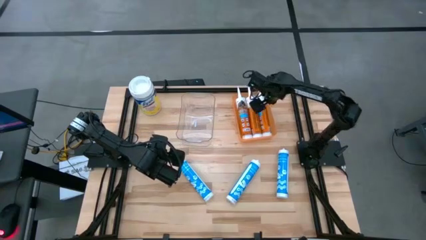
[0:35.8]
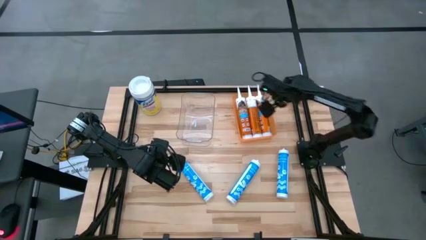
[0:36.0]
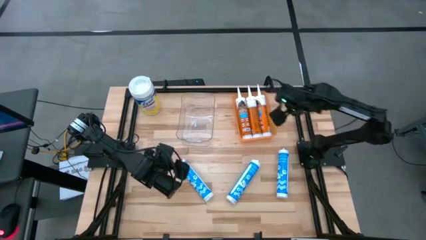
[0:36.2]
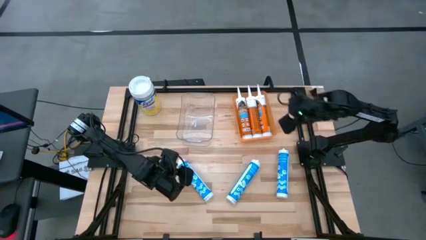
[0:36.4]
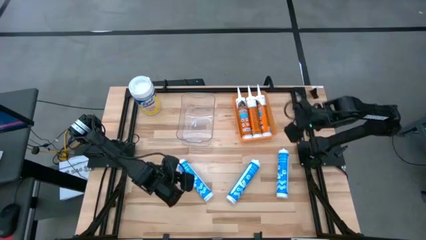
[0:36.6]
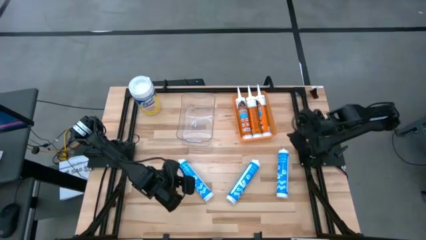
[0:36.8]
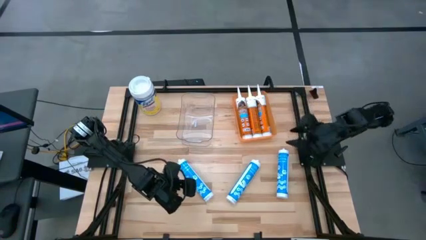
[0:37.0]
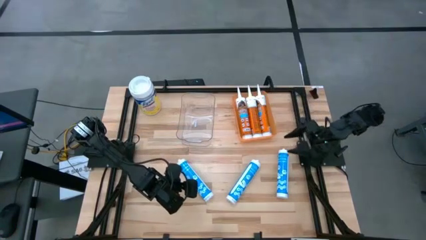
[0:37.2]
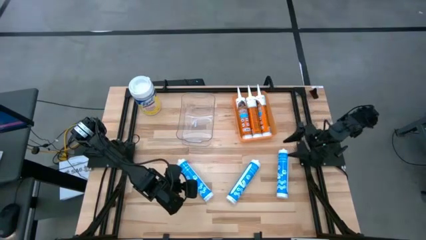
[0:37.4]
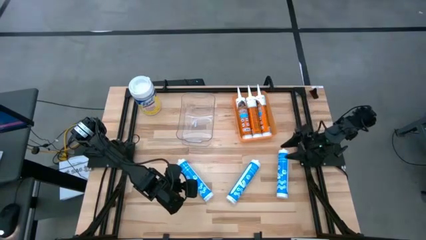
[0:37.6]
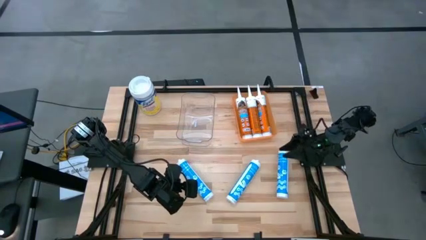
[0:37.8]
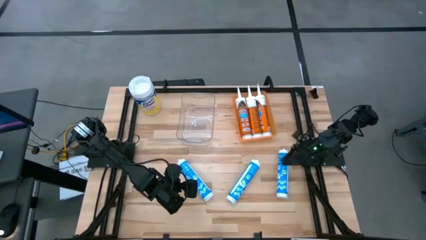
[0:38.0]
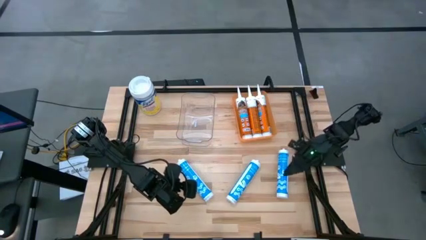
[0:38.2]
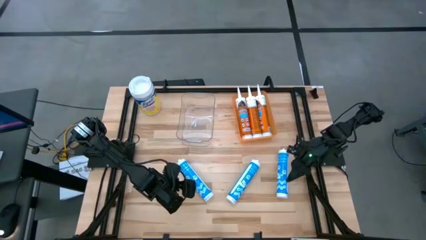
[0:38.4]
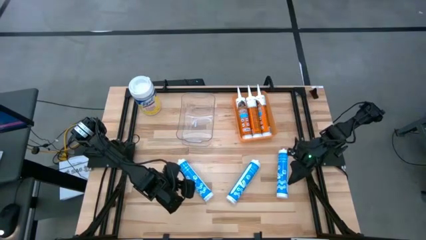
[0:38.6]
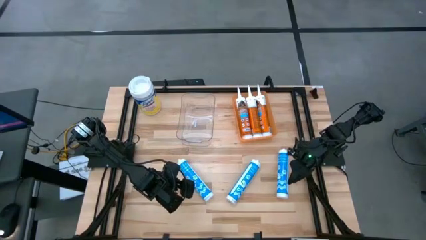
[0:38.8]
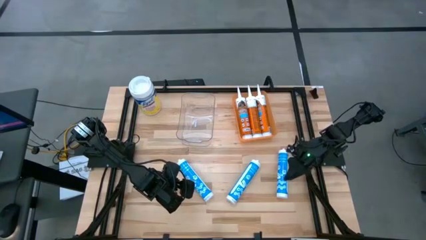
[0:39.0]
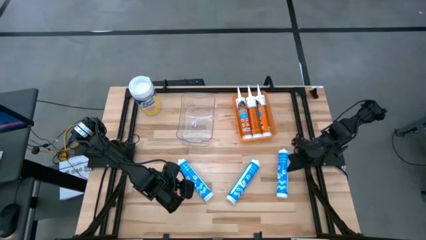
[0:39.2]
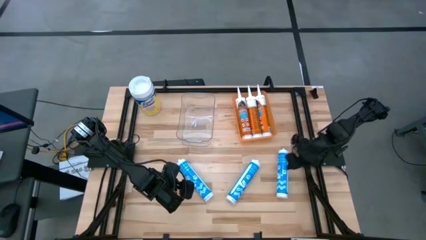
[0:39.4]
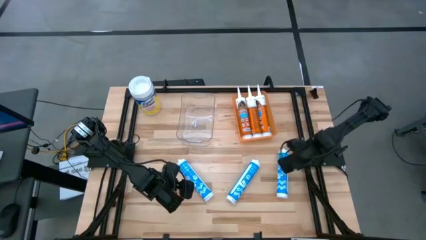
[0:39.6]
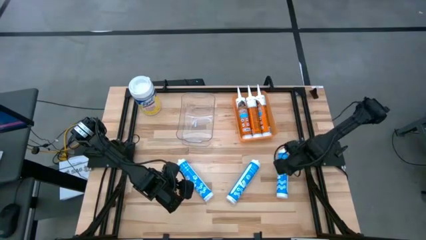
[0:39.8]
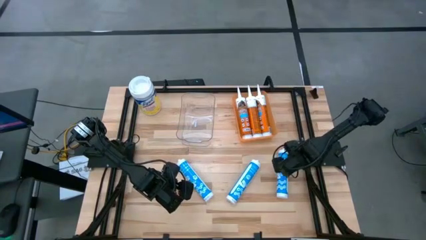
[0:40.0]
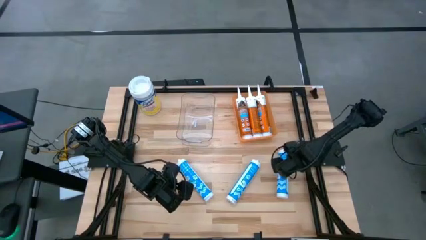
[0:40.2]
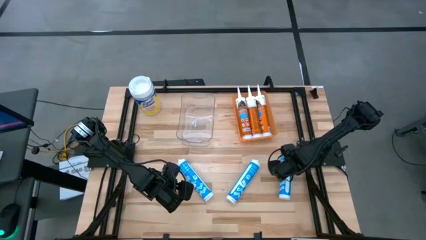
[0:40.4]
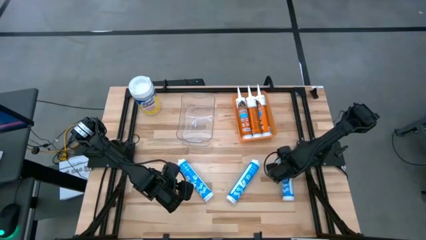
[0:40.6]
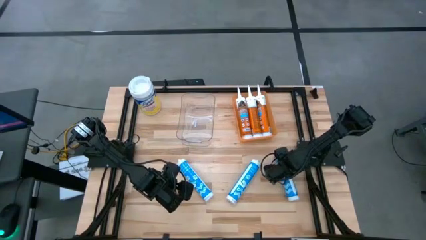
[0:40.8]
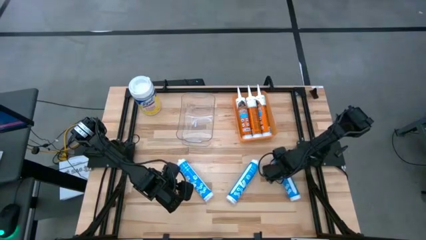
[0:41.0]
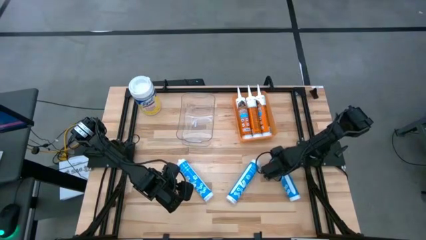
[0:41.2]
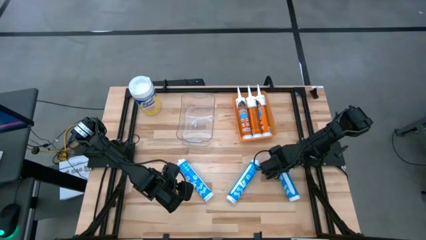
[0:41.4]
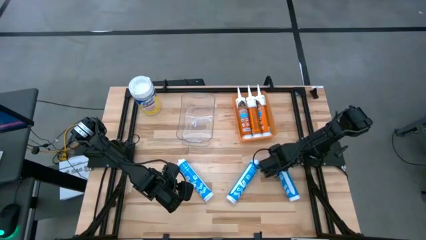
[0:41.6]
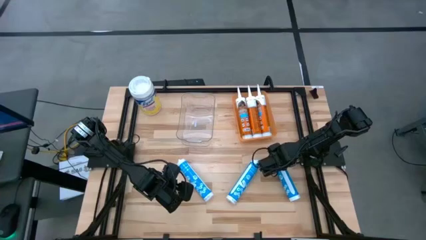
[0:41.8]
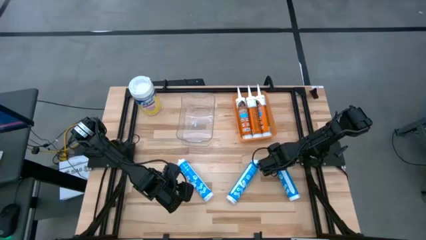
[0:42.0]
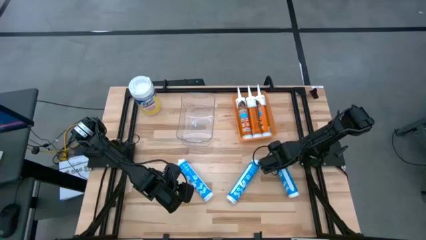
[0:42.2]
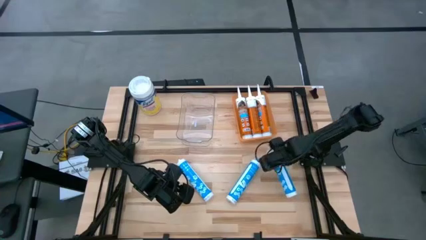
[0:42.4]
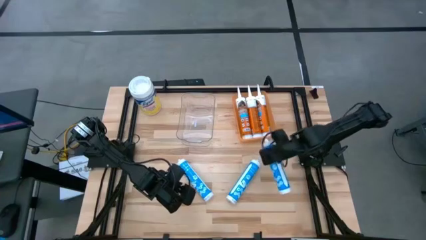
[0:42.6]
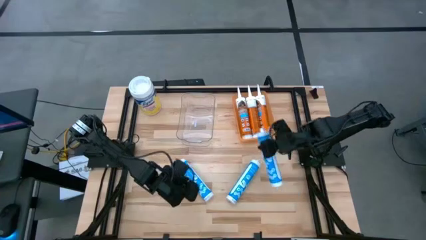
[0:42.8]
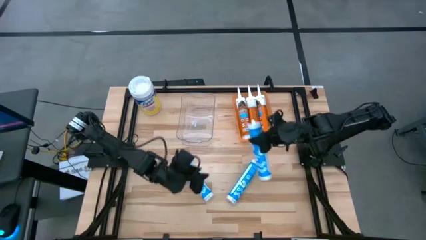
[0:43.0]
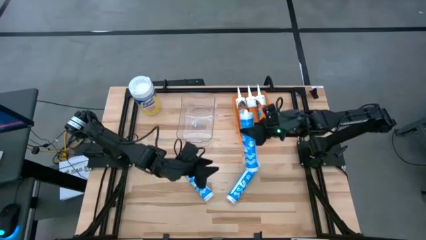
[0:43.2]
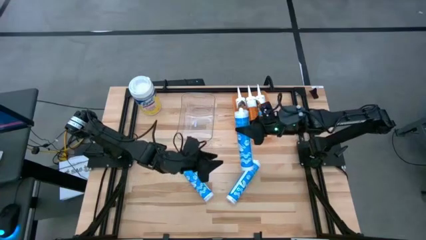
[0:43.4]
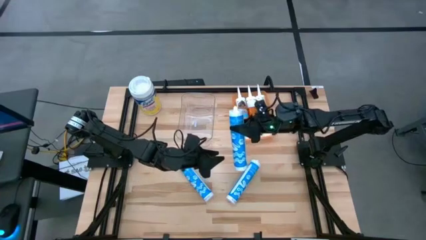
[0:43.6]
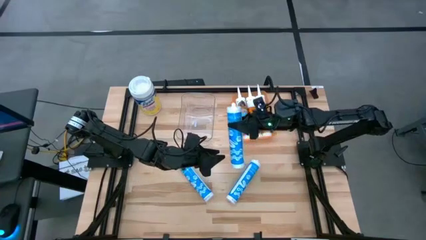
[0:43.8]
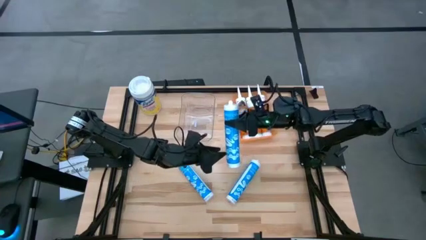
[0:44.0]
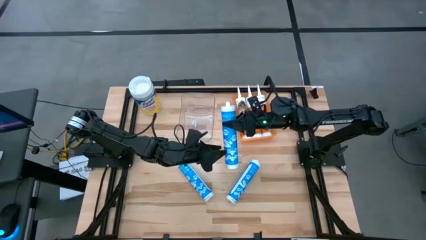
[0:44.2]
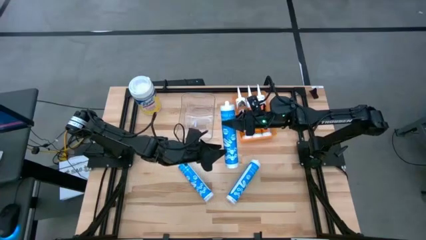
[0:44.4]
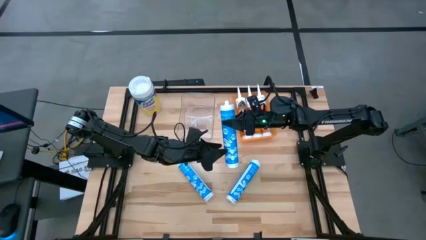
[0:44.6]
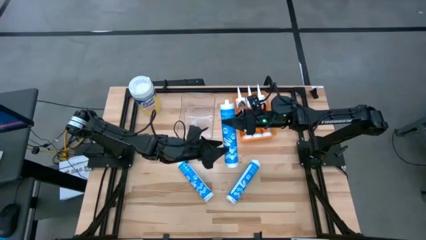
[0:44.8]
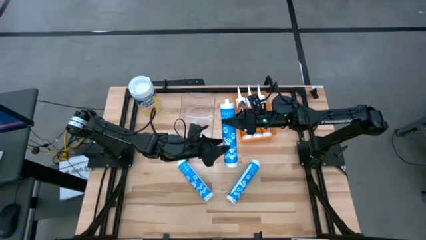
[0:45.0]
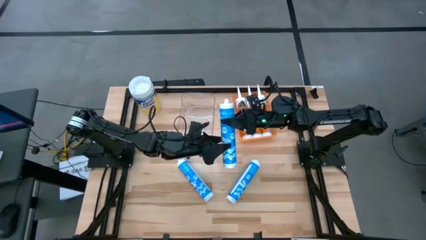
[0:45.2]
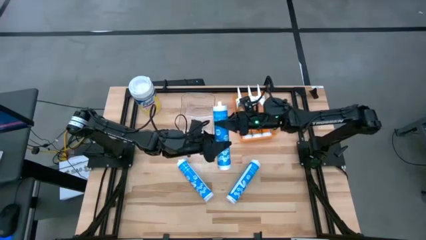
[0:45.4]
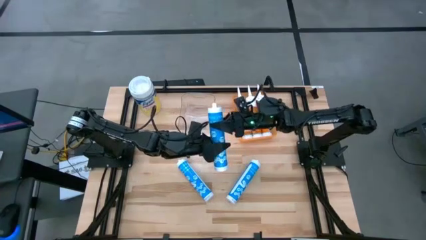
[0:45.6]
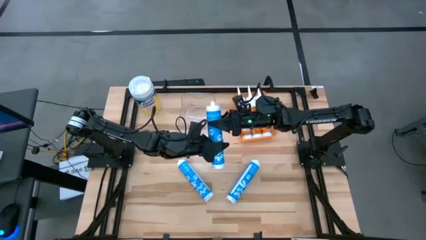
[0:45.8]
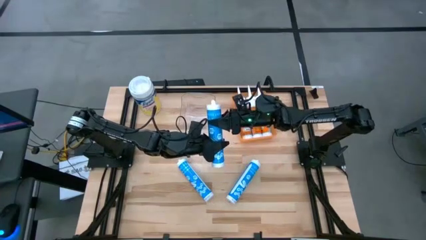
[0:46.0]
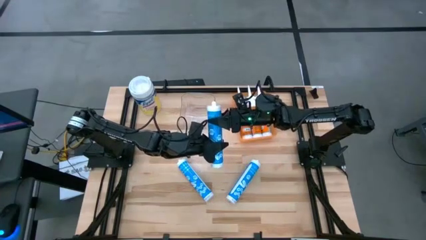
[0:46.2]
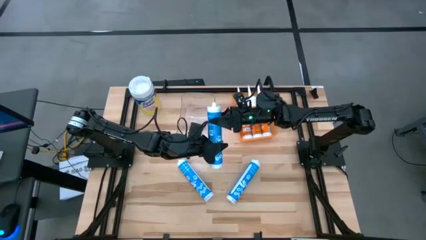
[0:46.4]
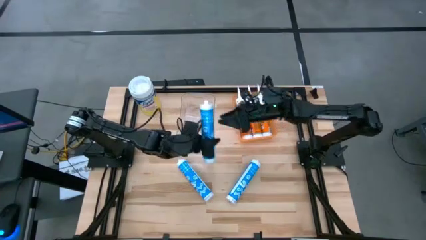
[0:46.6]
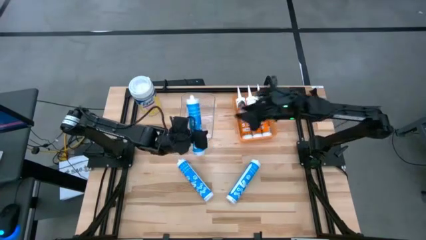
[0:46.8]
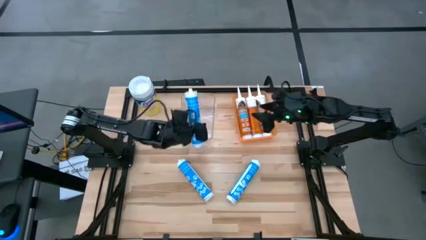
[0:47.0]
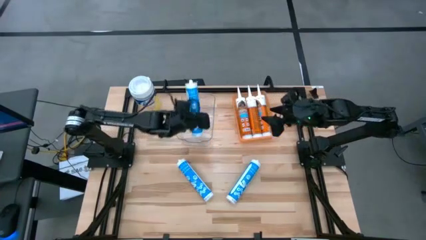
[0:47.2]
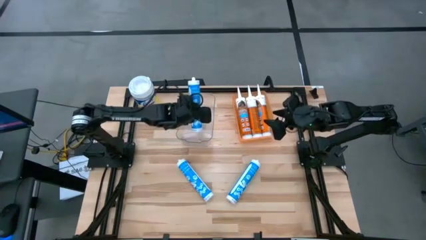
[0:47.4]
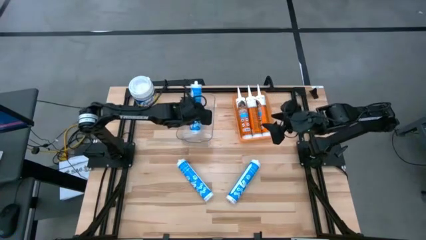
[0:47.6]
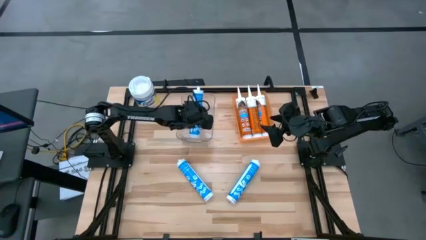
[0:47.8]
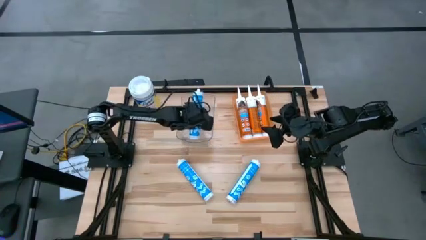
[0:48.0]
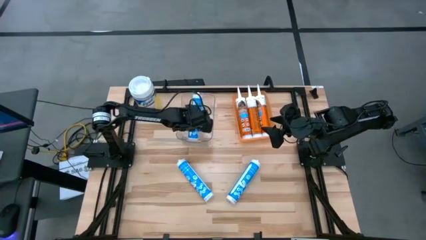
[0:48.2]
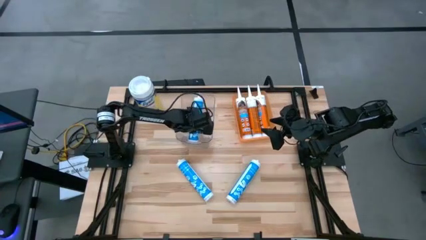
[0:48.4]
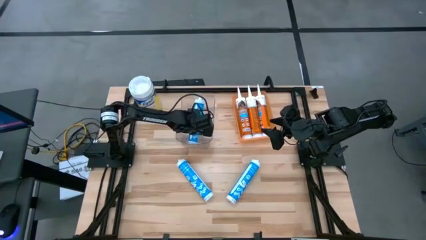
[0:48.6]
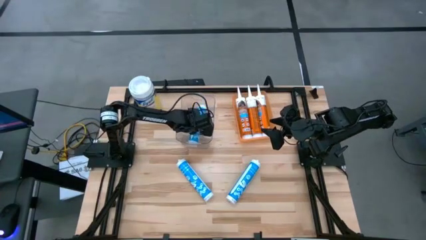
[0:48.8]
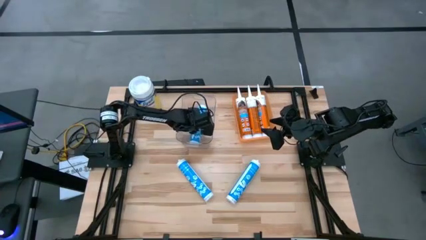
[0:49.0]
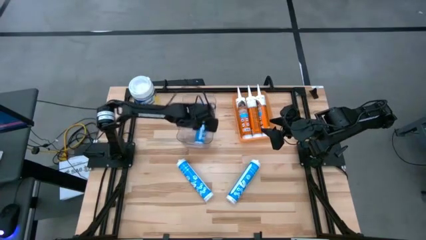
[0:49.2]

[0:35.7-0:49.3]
Task: Pick & place silicon tubes, Sealant and Lysol wipes
Put the blue sealant into the transparent bin
